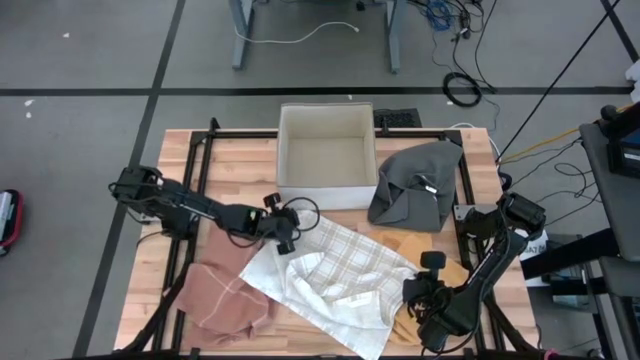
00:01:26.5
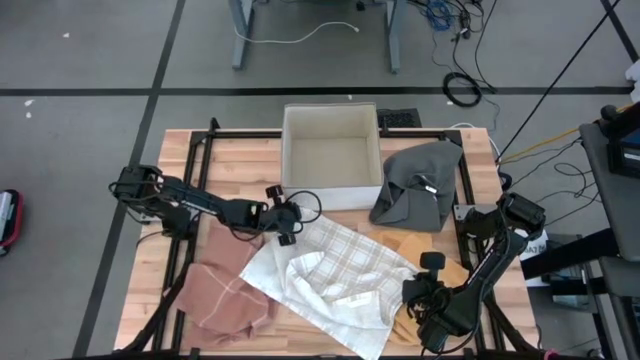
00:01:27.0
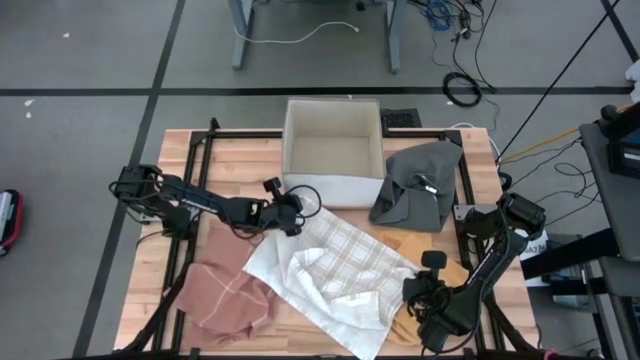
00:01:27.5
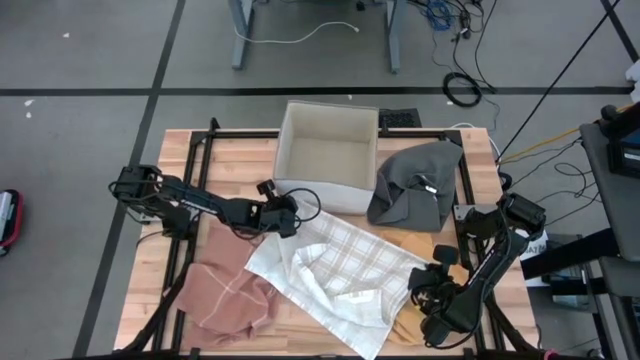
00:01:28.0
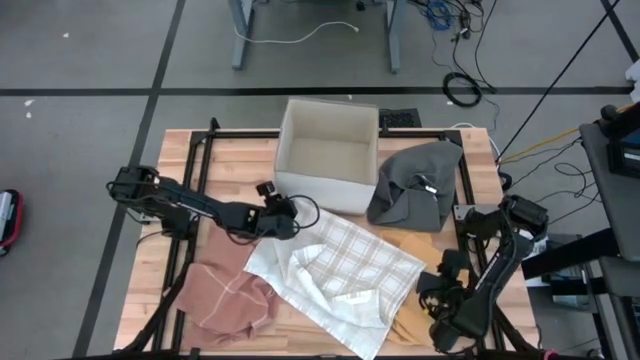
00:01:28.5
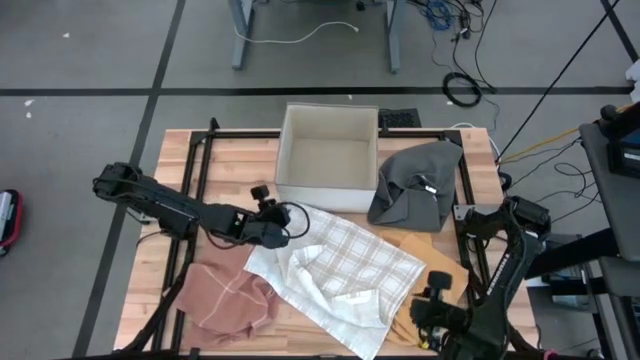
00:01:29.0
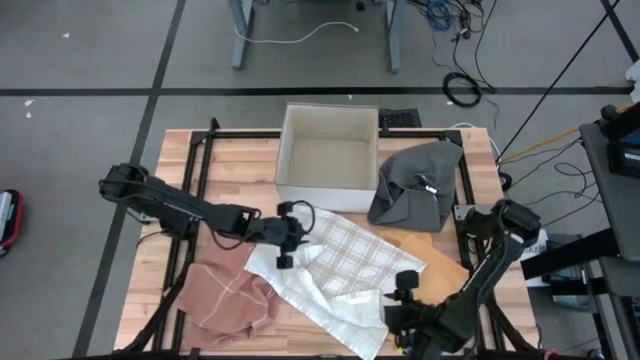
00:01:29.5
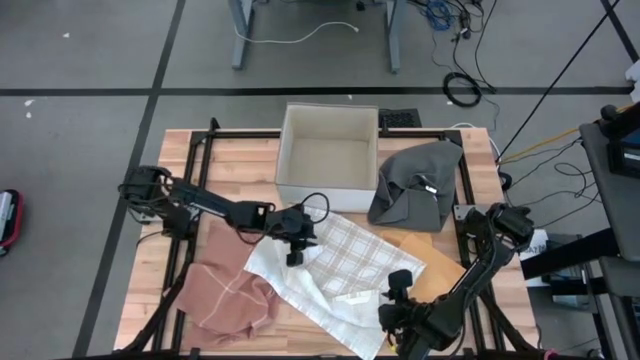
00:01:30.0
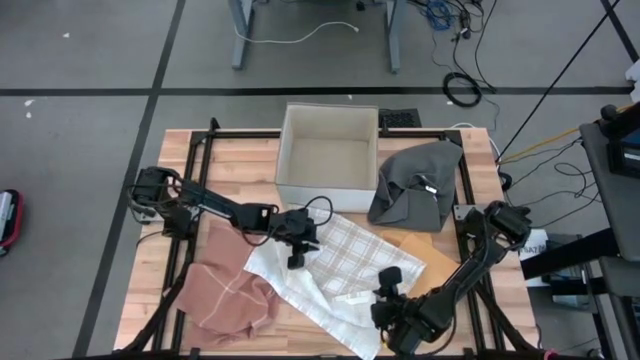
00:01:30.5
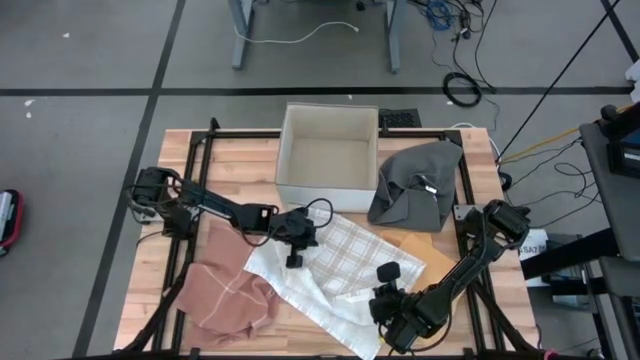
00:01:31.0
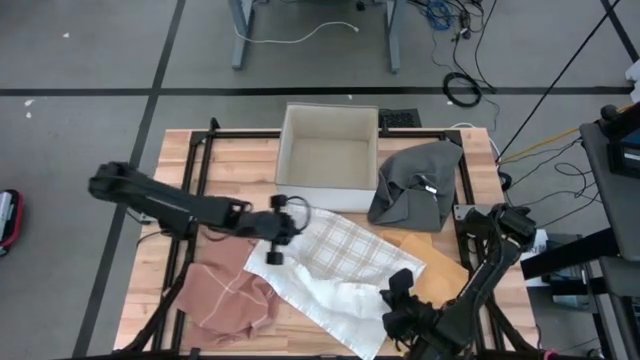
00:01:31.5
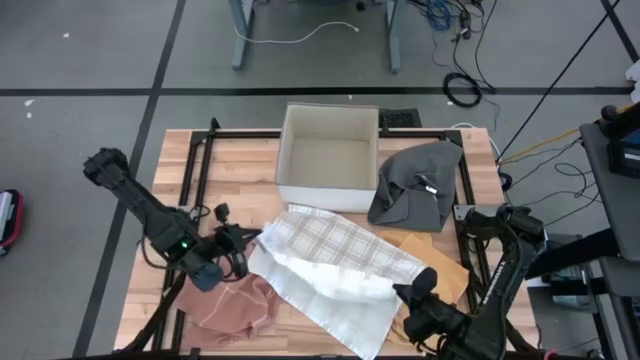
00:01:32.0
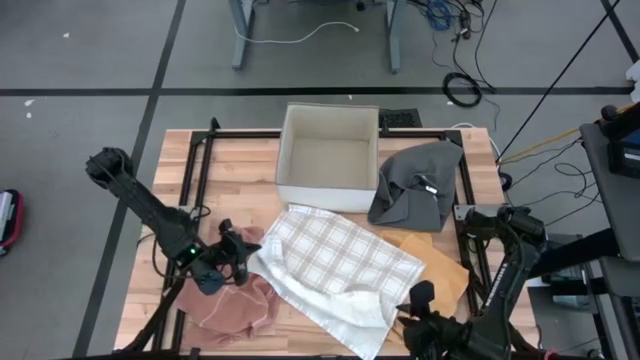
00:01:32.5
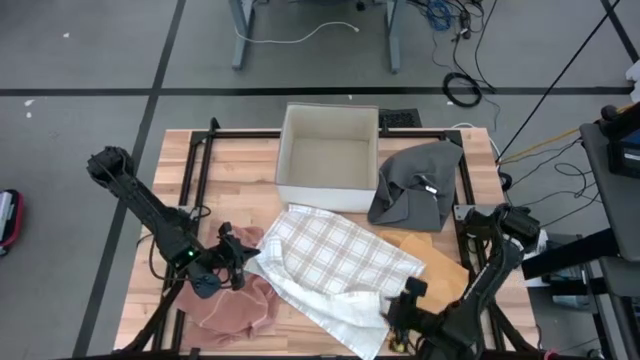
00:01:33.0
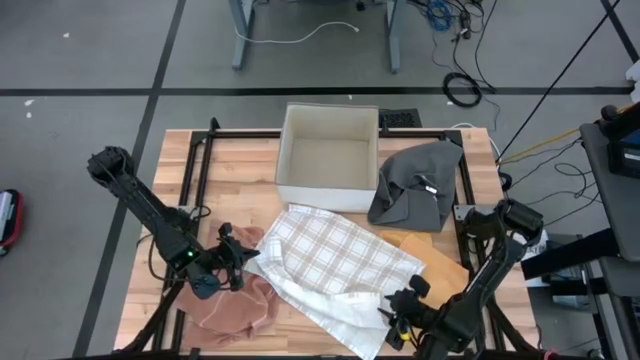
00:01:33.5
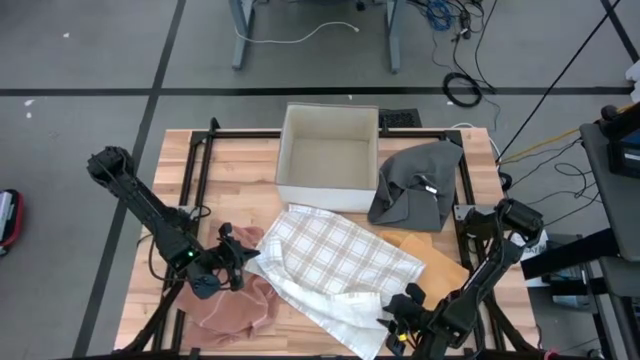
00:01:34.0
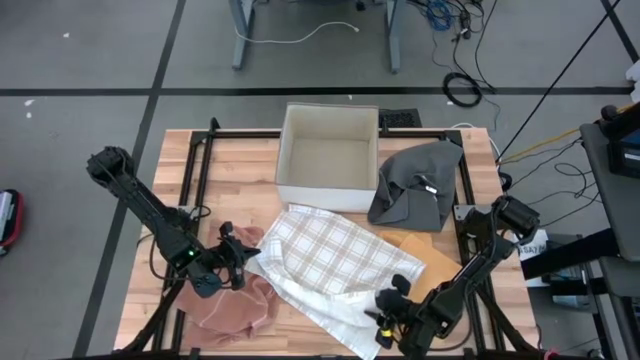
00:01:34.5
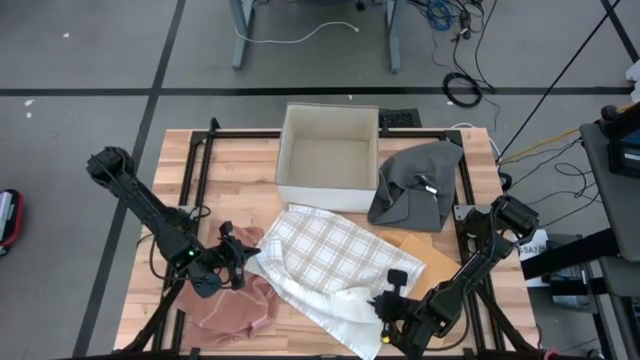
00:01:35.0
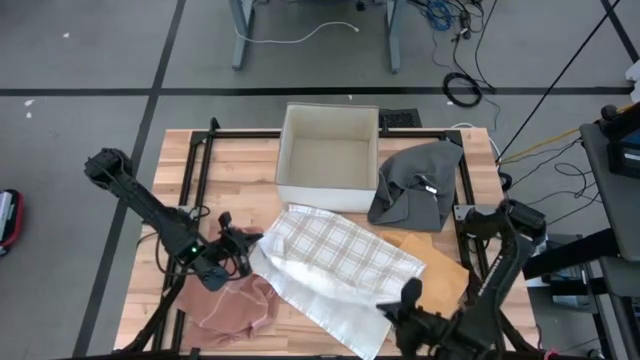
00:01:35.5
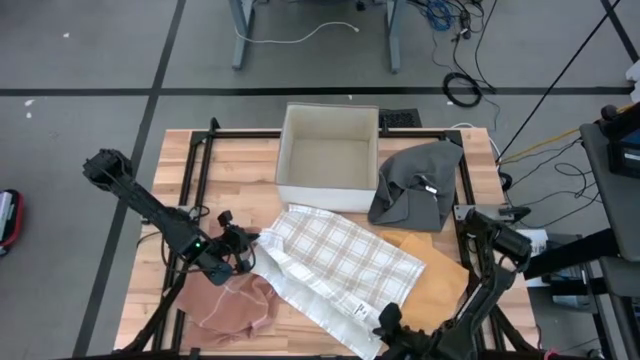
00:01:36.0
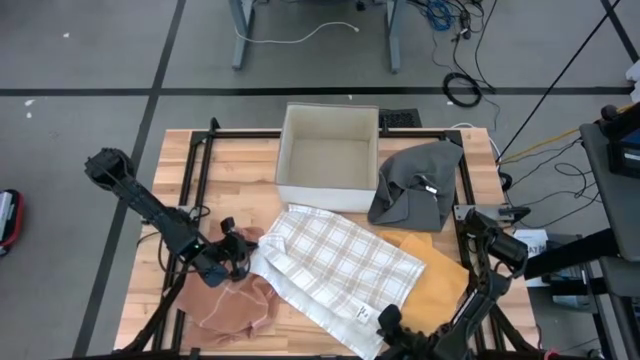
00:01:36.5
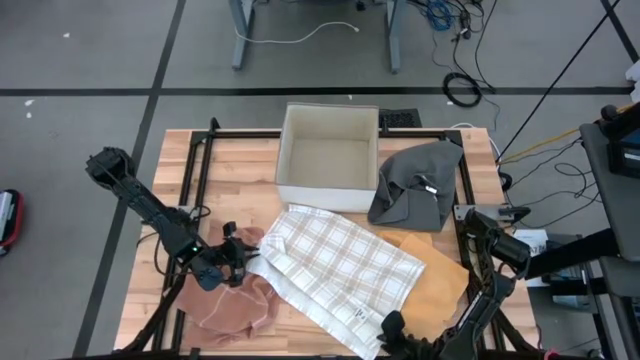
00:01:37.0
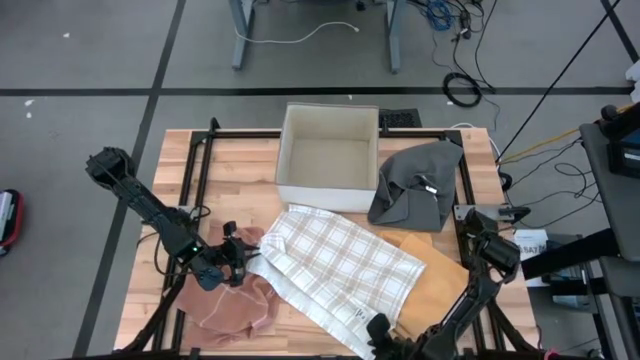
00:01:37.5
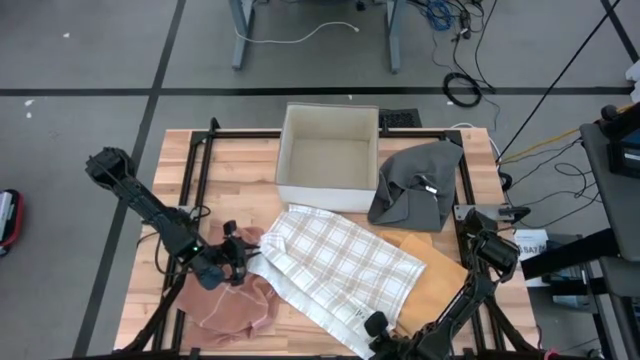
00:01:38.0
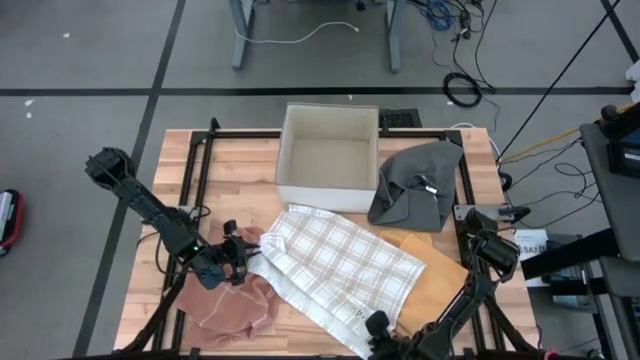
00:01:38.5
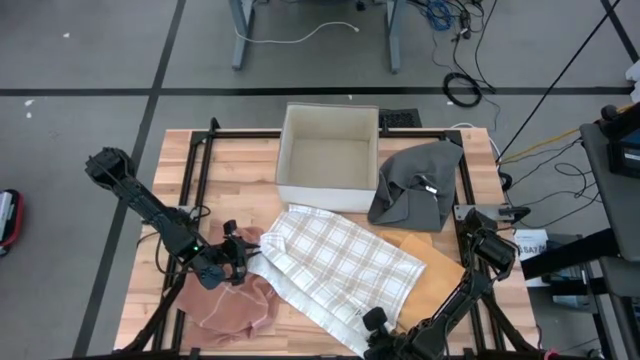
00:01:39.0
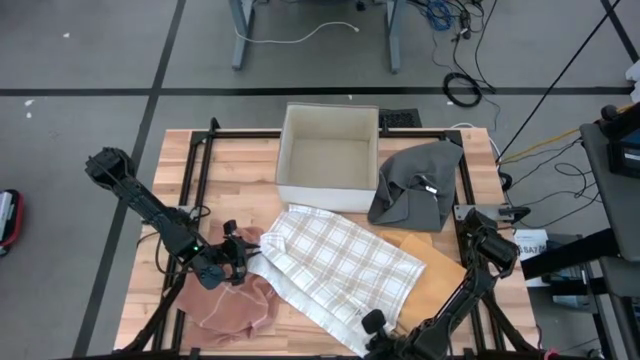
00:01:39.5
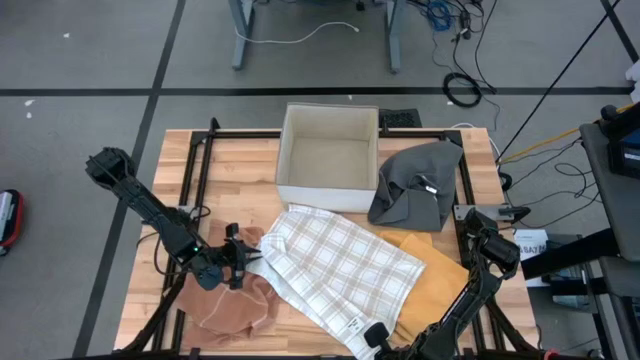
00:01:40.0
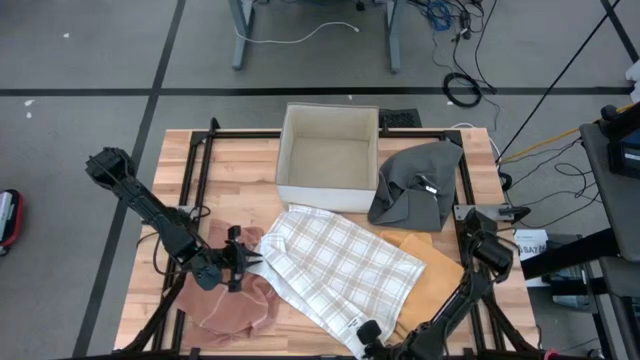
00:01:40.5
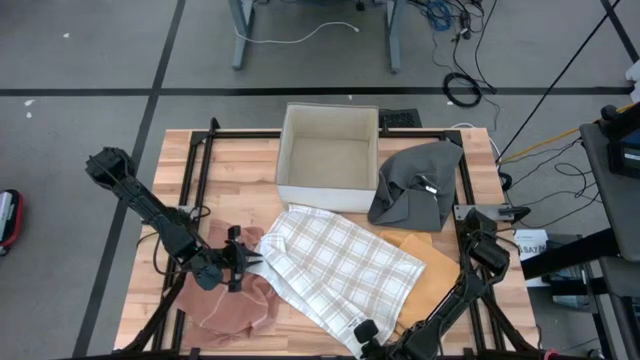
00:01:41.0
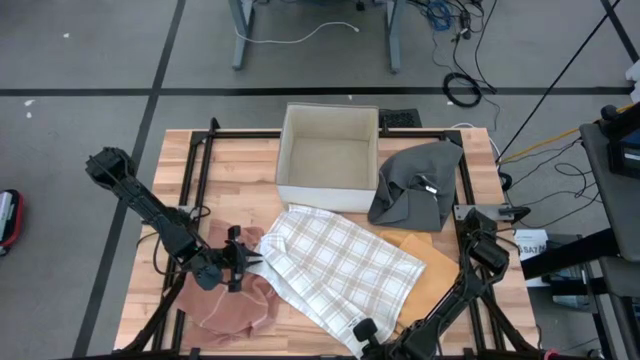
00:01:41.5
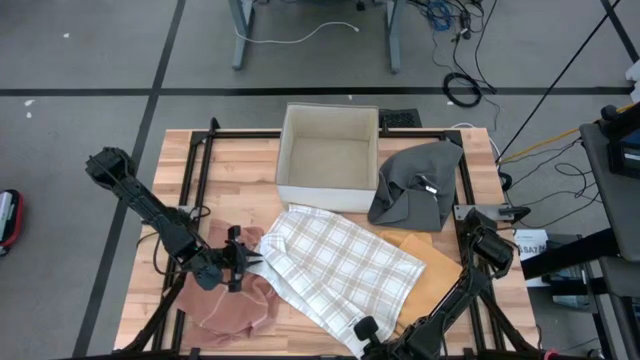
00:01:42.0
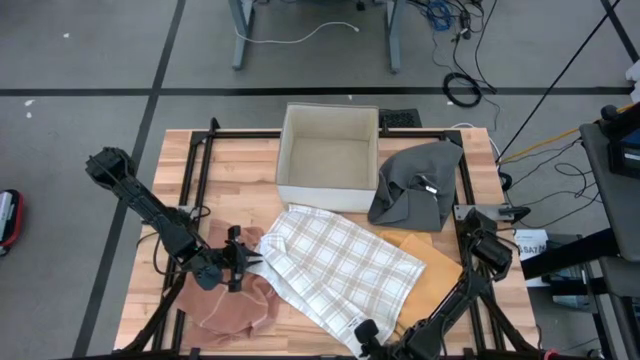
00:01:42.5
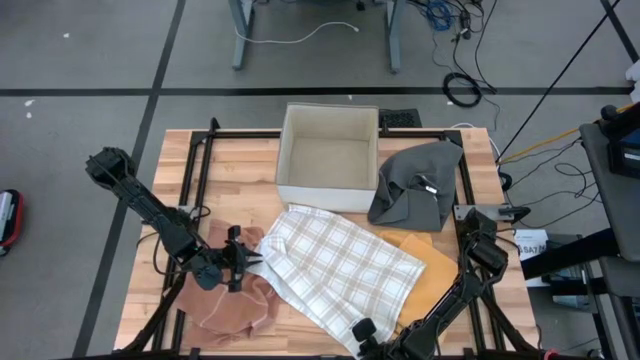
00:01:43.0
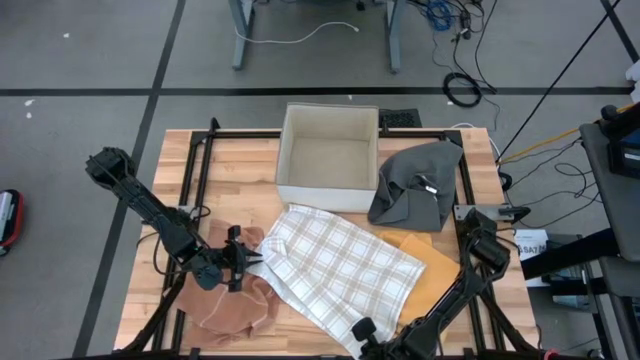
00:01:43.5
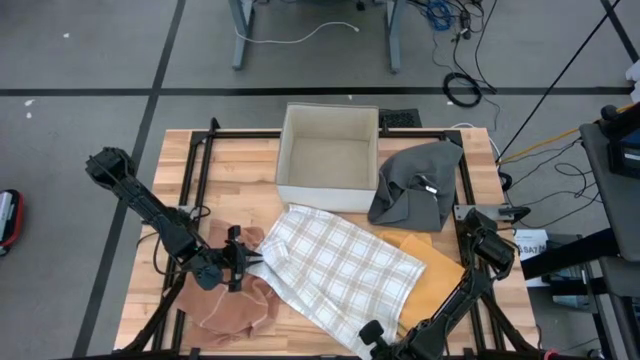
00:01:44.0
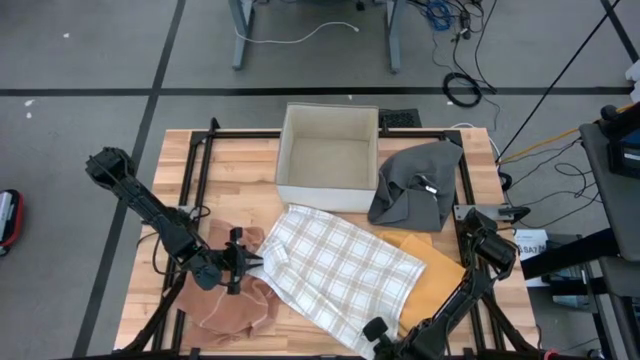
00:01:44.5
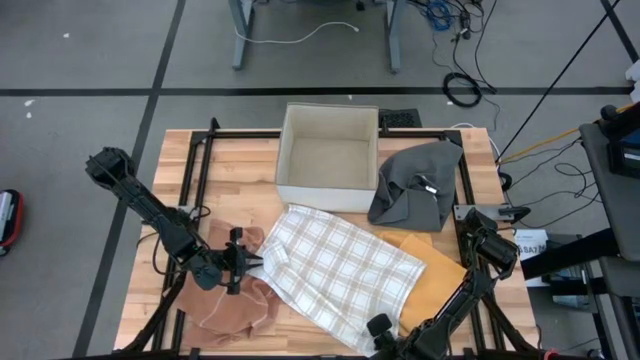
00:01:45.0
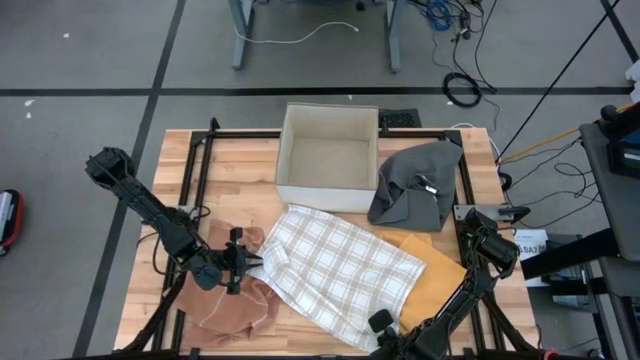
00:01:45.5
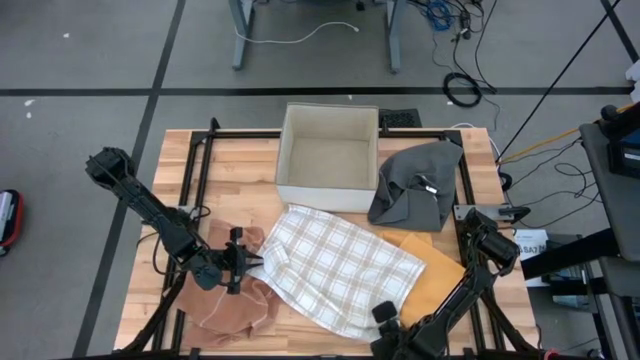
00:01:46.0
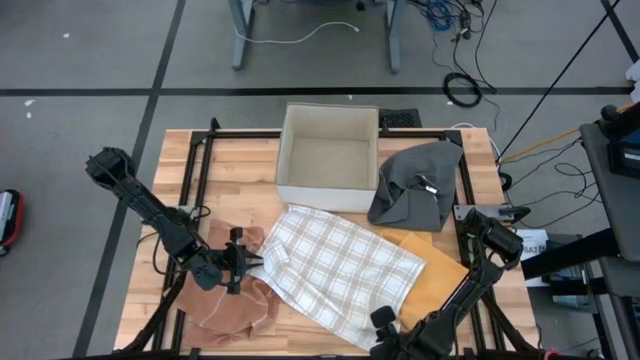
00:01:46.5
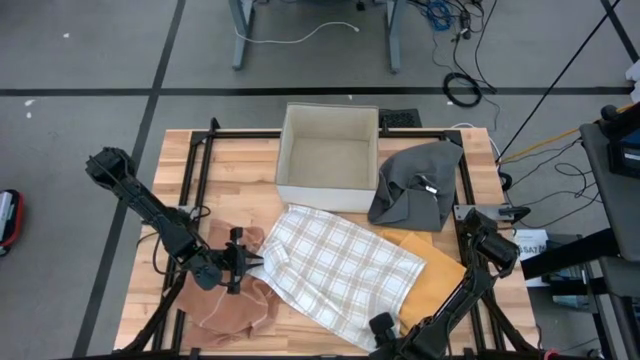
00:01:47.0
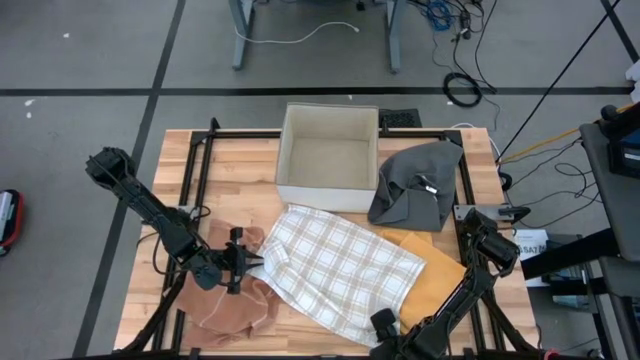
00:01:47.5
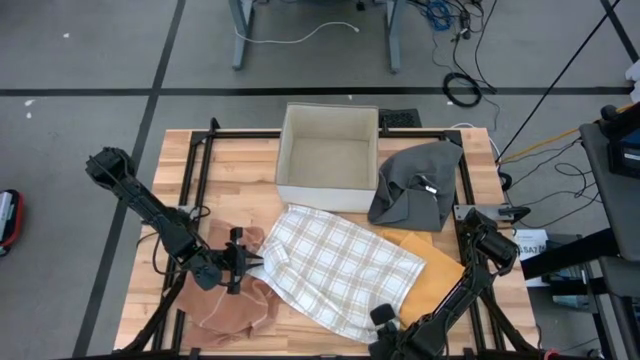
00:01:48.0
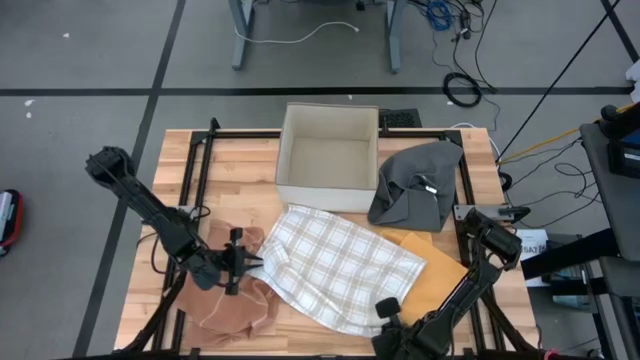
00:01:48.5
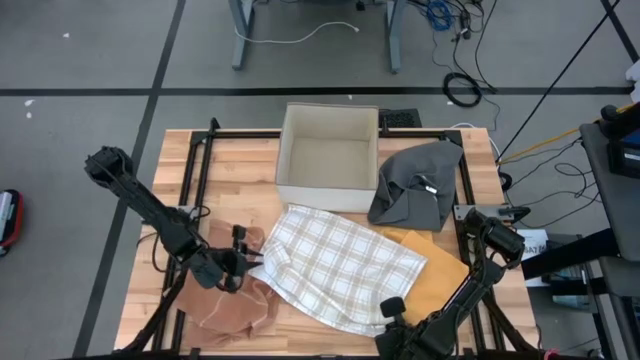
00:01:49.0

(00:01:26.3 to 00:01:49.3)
Task: Fold towel
Fold the white patterned towel
